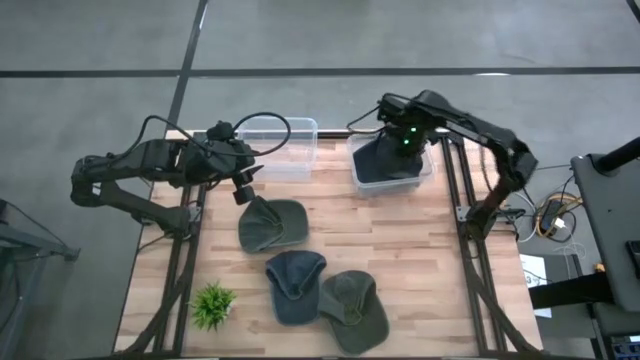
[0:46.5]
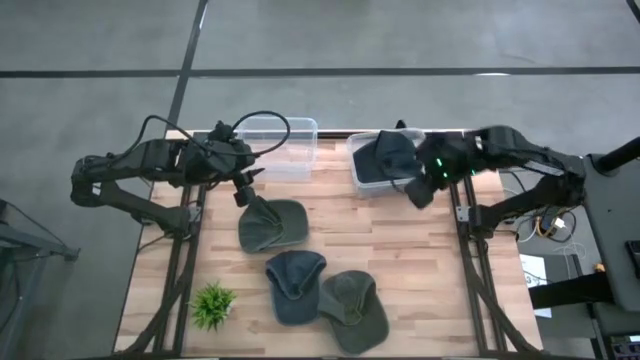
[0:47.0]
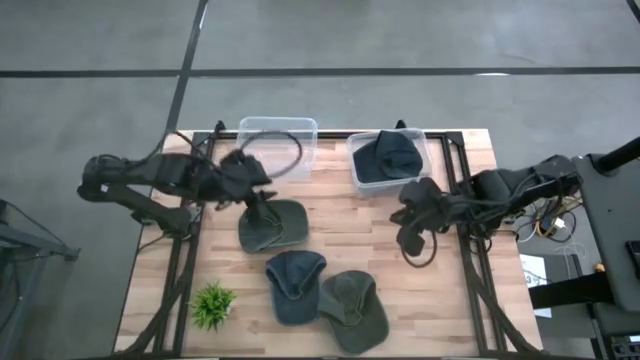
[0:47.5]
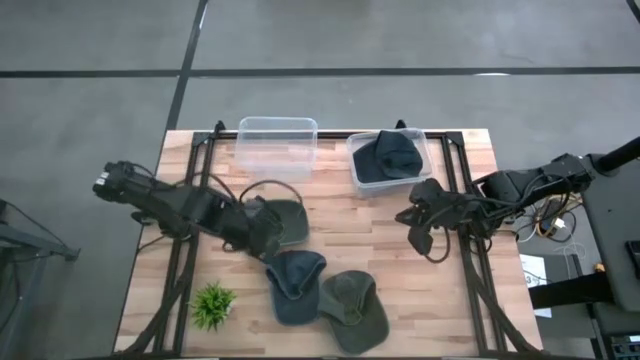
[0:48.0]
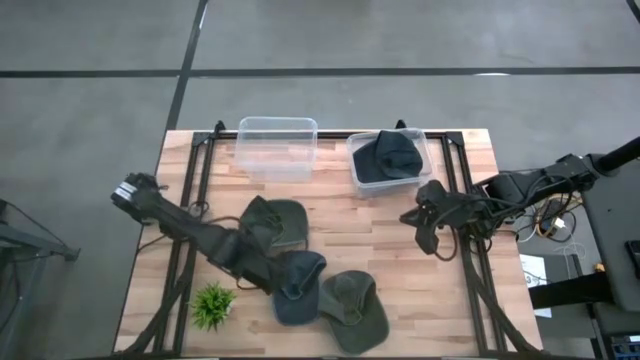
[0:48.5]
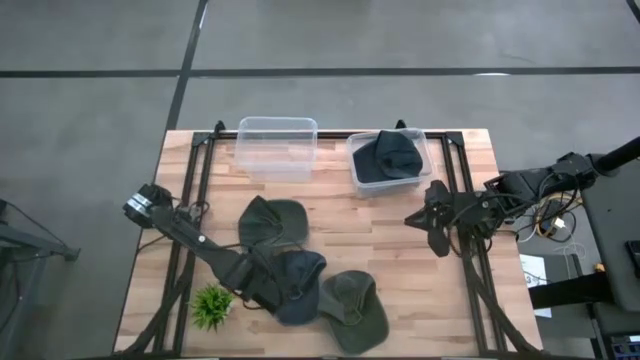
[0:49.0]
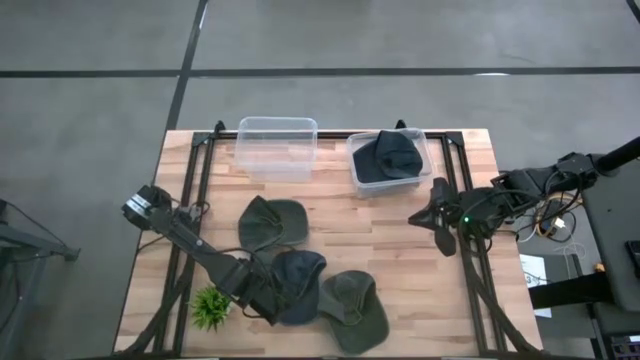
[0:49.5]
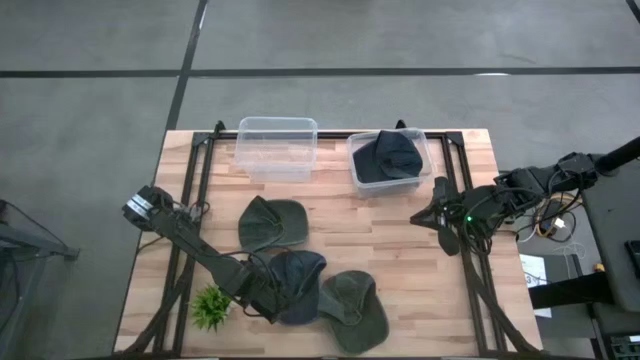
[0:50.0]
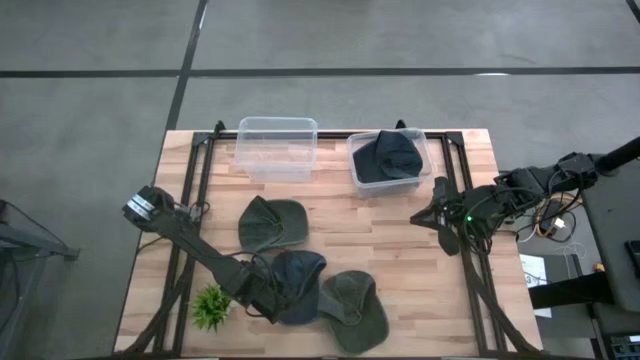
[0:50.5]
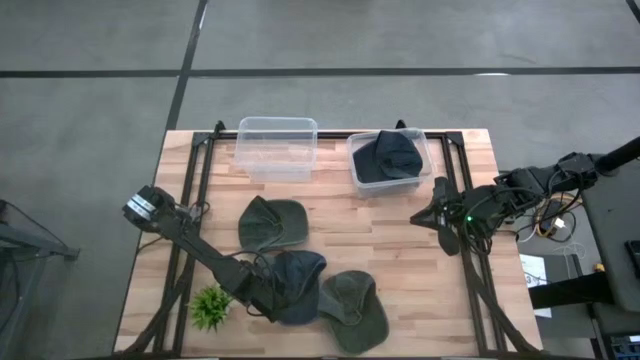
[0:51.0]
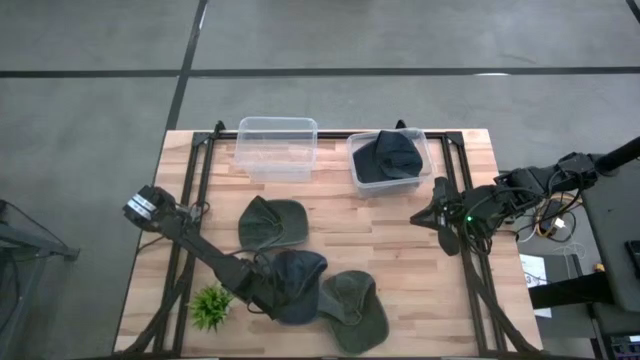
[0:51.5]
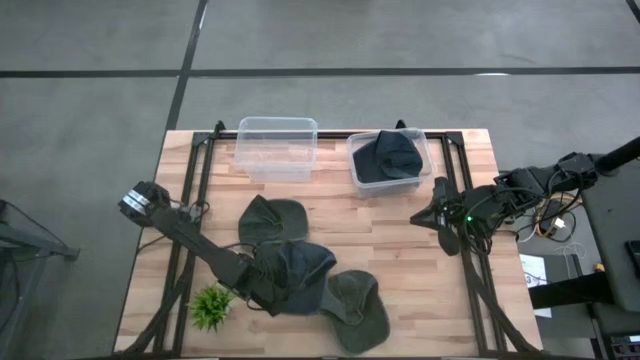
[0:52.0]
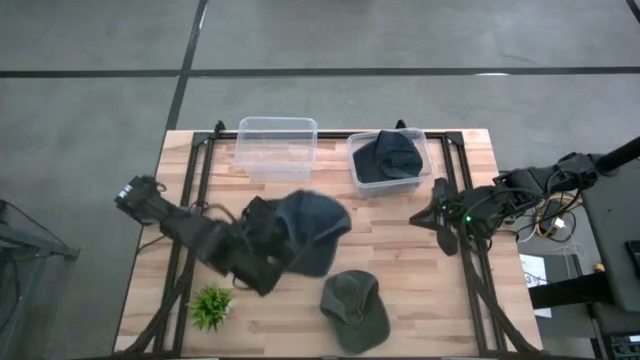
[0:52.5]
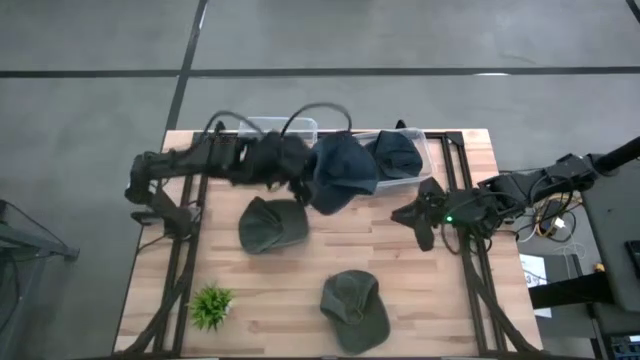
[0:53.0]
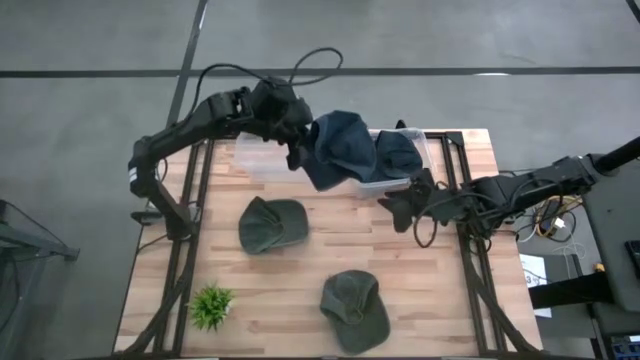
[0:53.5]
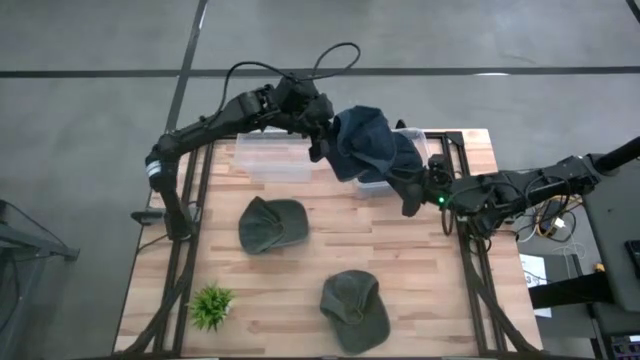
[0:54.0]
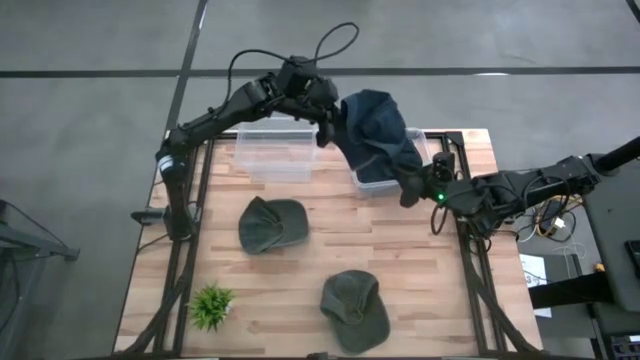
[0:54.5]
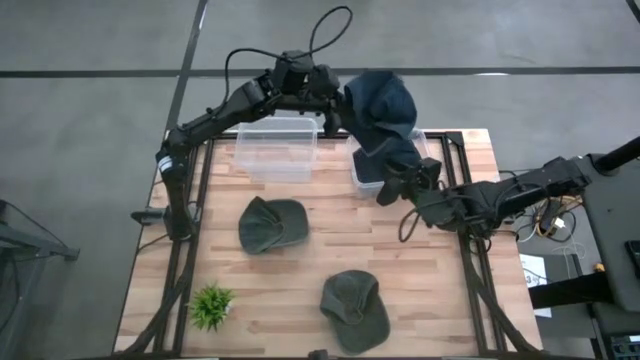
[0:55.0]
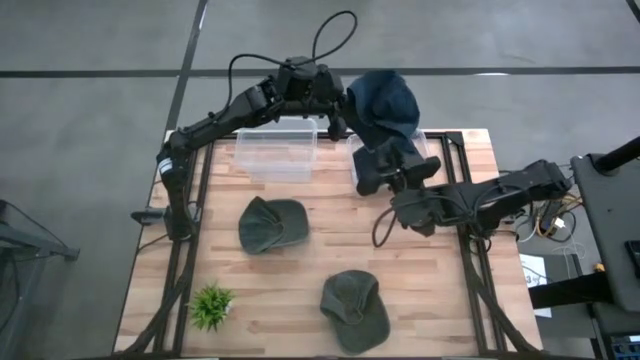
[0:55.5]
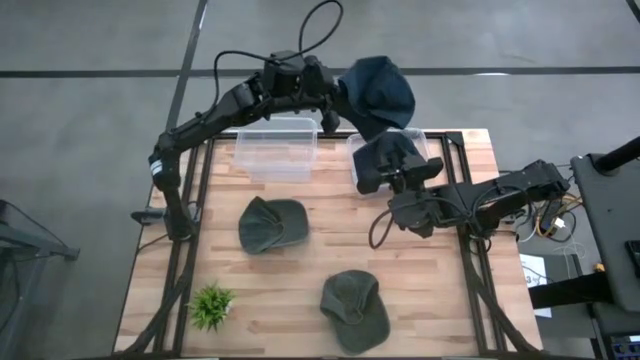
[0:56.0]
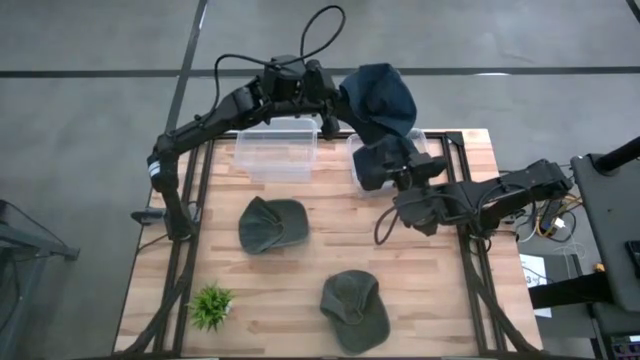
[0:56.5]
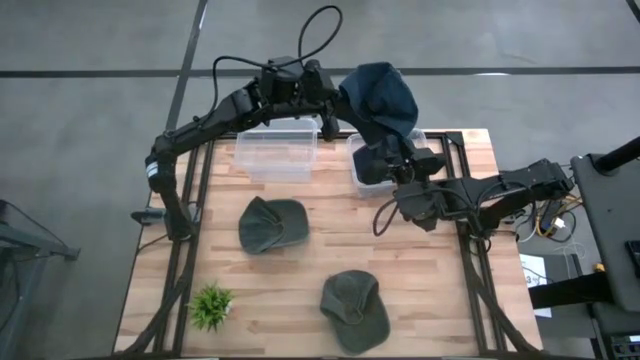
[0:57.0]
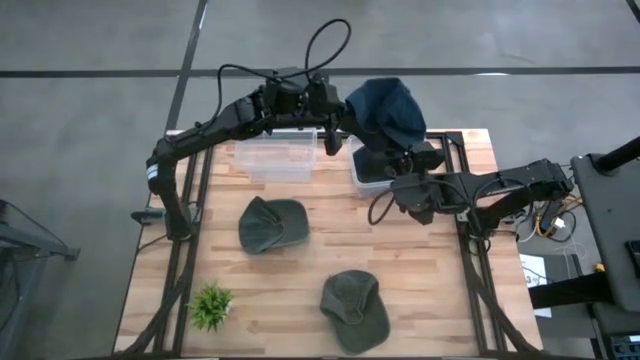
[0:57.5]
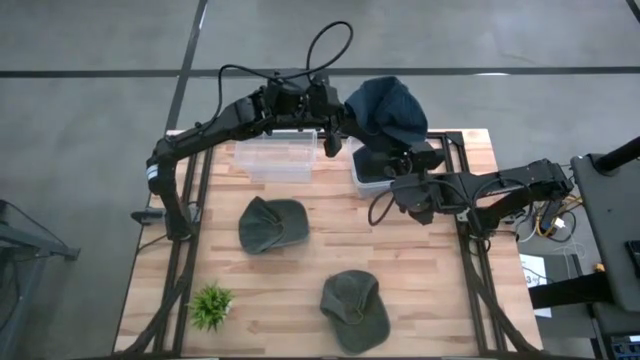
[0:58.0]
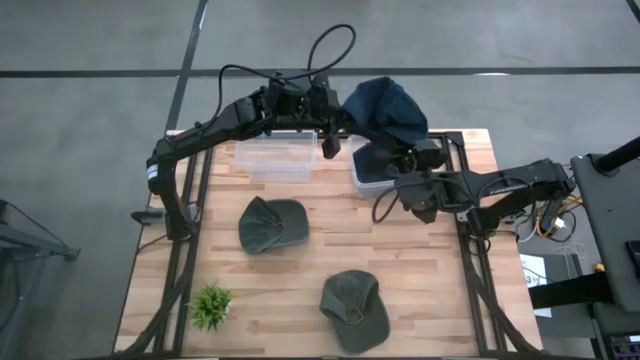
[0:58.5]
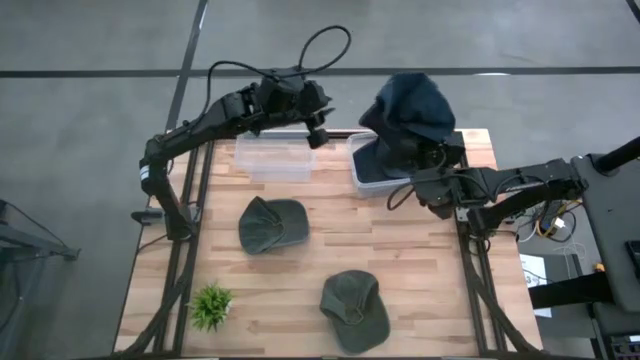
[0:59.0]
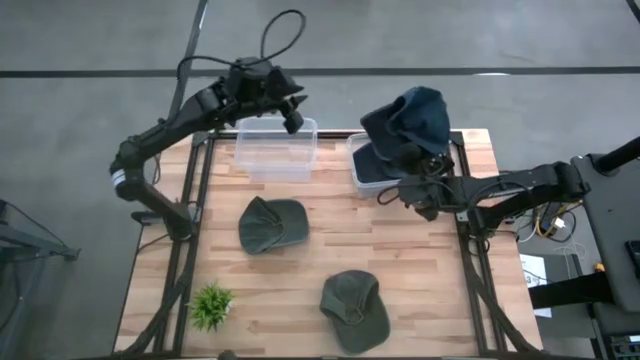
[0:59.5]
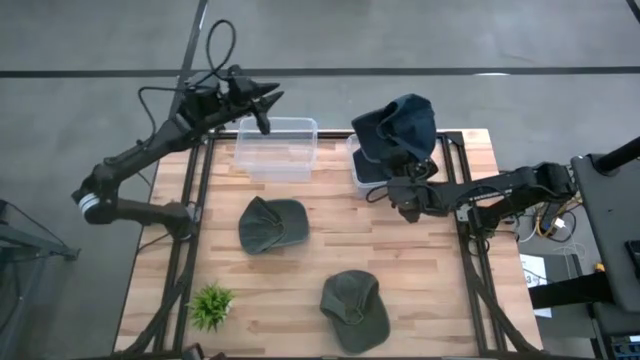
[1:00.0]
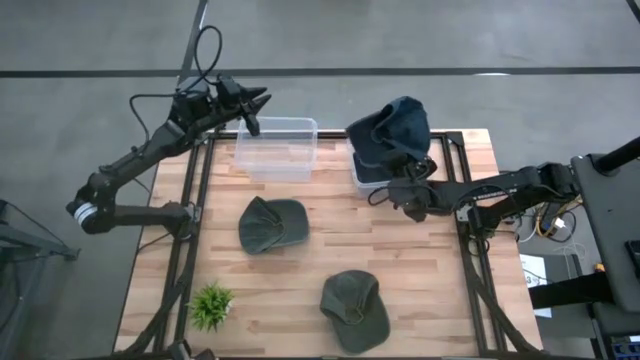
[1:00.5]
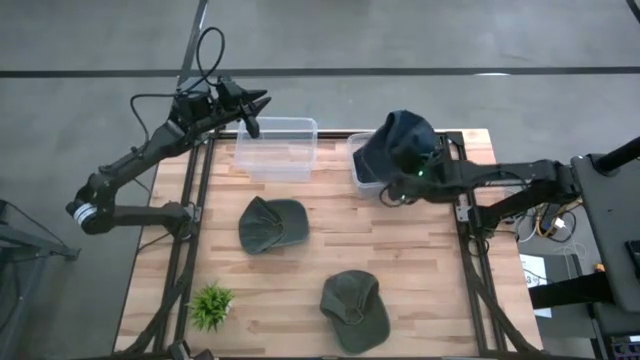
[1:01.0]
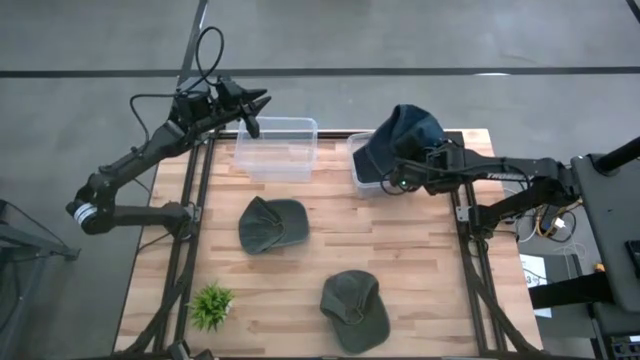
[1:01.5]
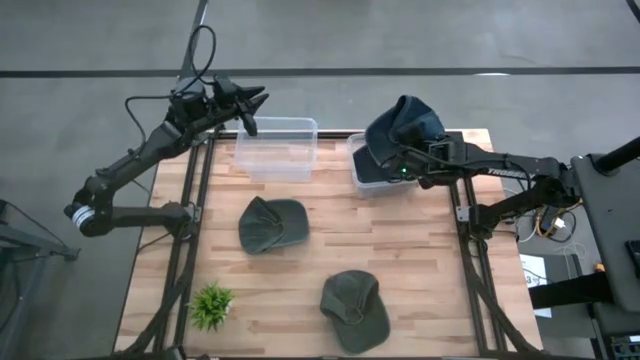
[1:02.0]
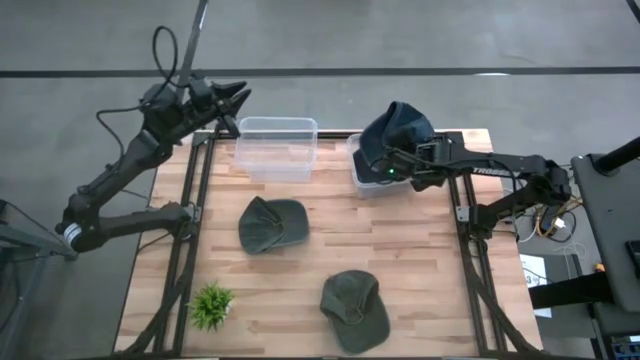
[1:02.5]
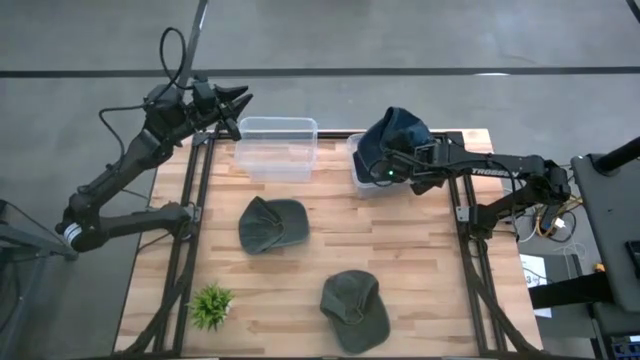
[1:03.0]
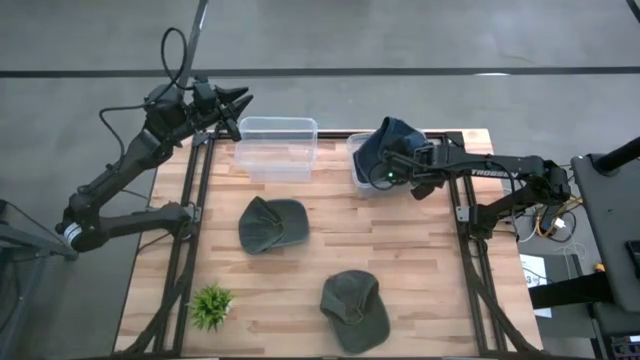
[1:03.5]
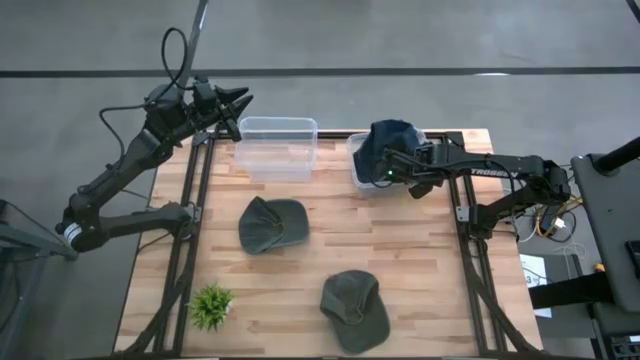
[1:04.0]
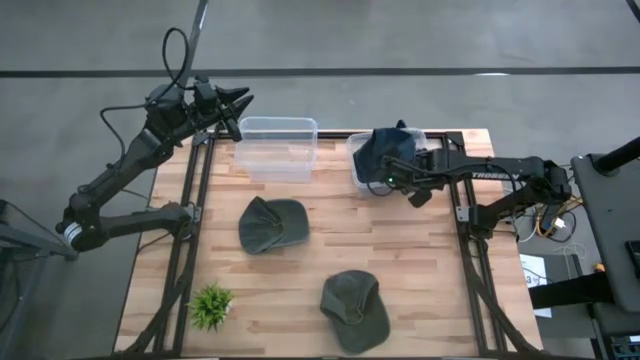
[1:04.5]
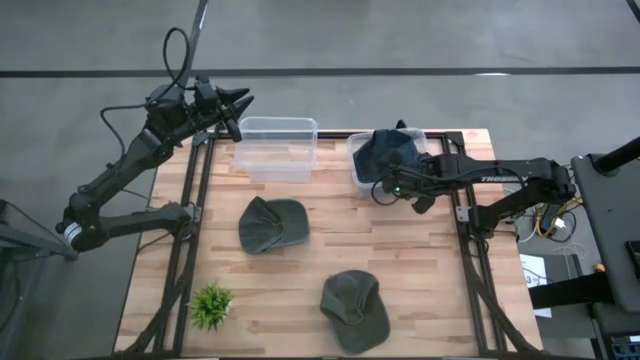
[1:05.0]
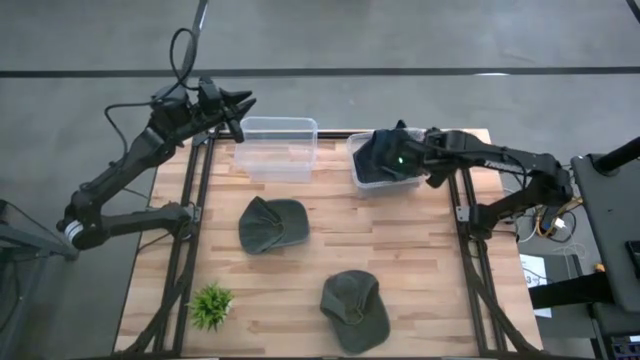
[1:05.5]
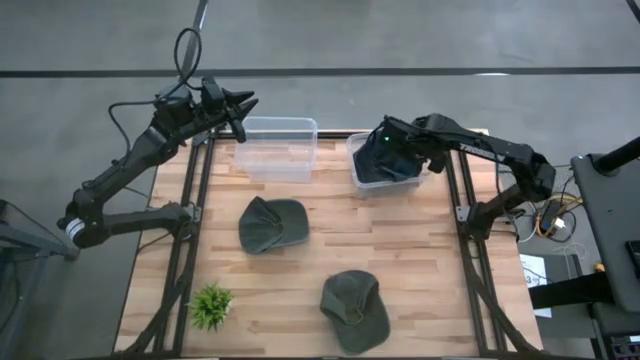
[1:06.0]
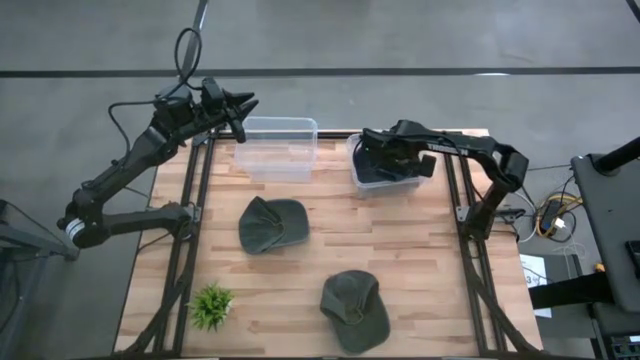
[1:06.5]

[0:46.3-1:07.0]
Task: Pick & Place hat
Put the blue cap into the right transparent bin
